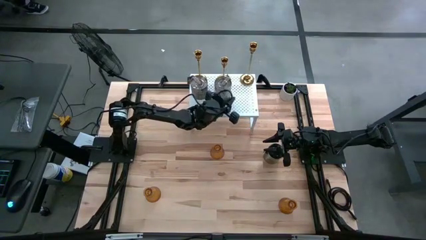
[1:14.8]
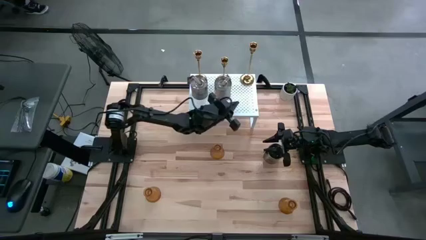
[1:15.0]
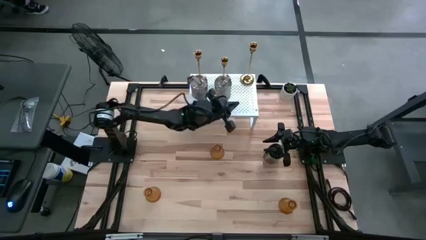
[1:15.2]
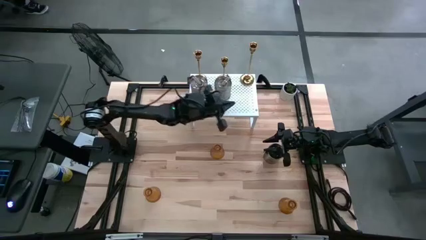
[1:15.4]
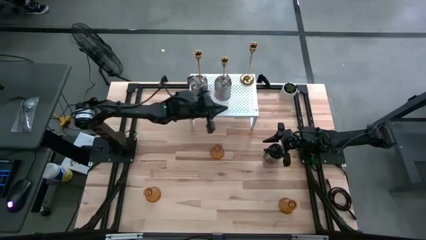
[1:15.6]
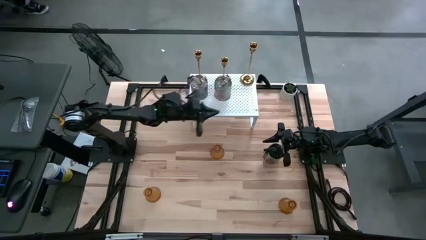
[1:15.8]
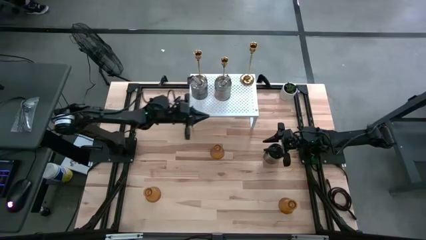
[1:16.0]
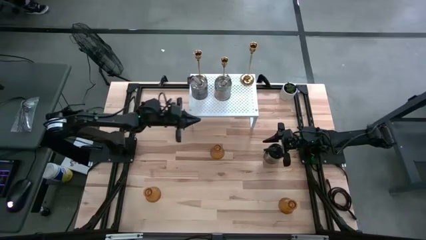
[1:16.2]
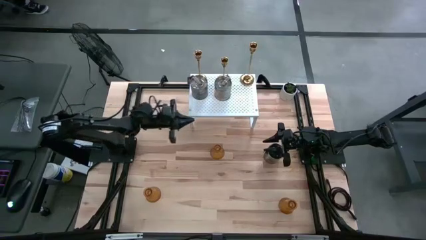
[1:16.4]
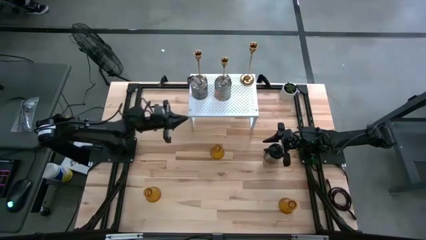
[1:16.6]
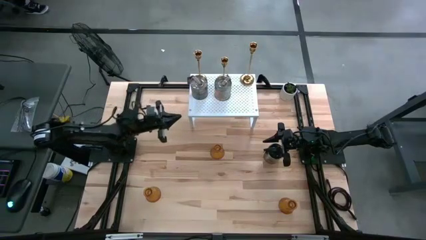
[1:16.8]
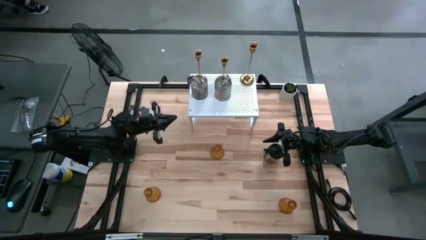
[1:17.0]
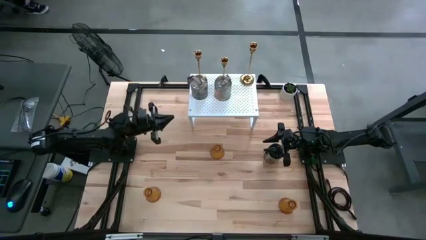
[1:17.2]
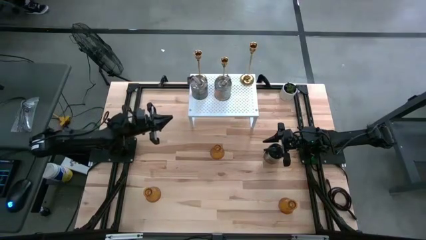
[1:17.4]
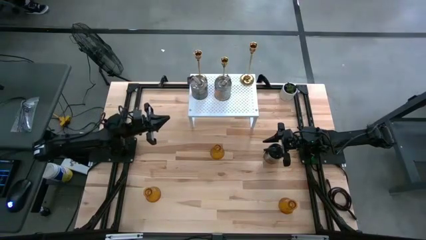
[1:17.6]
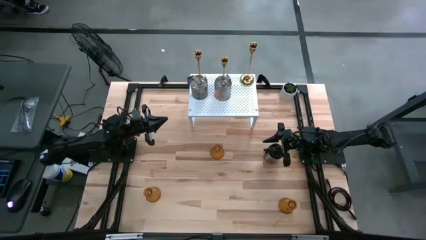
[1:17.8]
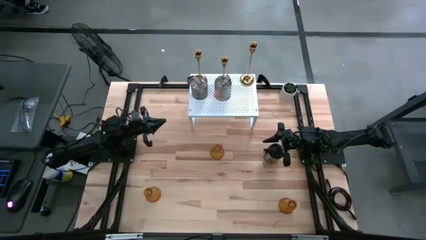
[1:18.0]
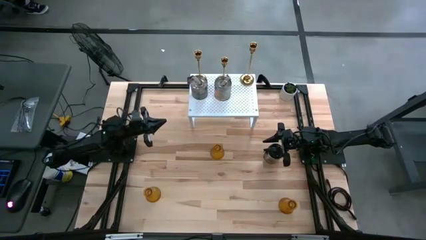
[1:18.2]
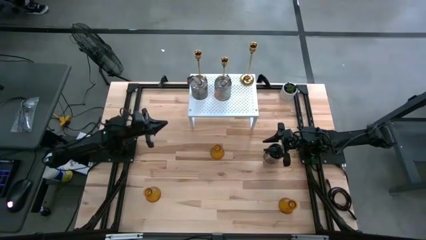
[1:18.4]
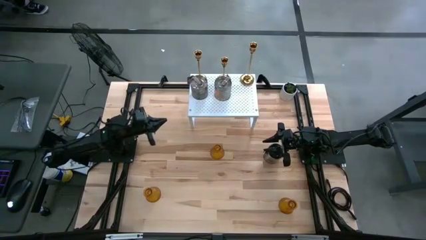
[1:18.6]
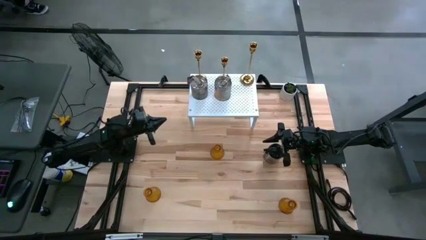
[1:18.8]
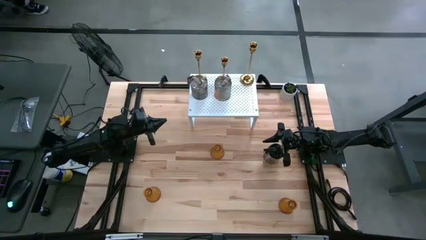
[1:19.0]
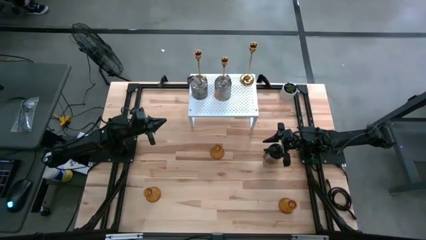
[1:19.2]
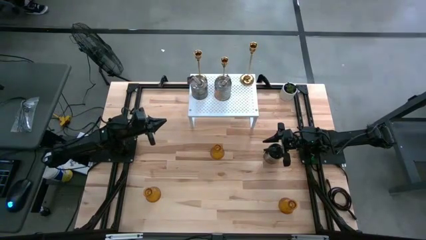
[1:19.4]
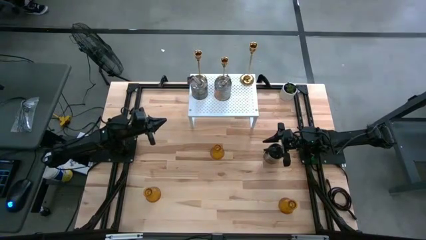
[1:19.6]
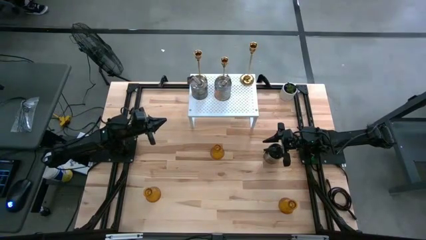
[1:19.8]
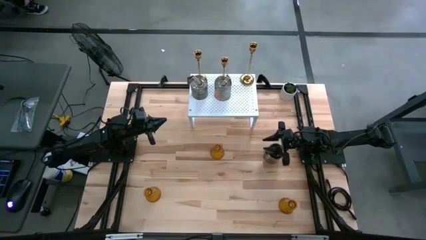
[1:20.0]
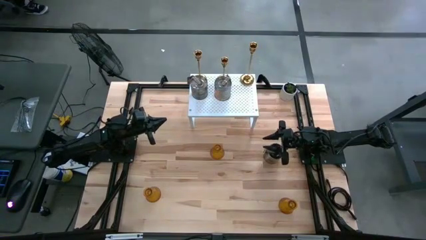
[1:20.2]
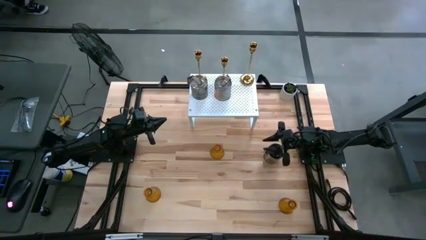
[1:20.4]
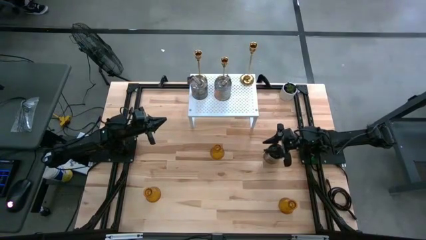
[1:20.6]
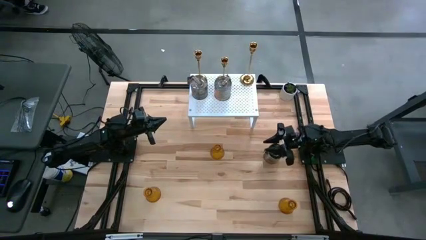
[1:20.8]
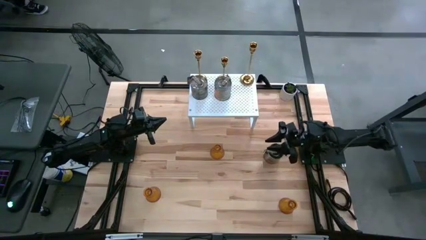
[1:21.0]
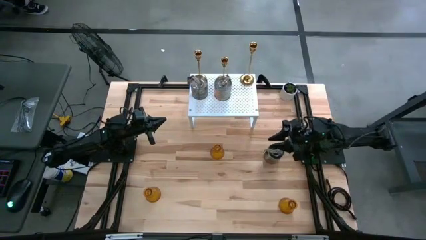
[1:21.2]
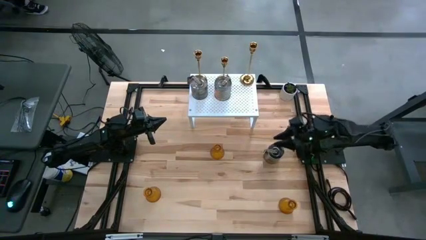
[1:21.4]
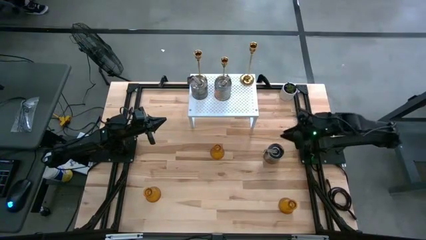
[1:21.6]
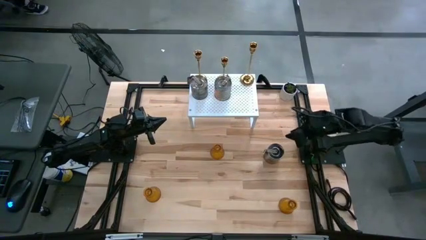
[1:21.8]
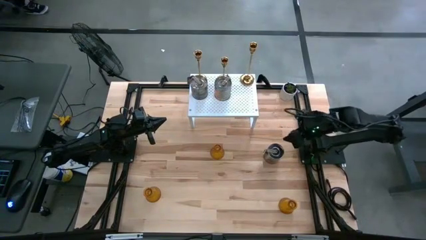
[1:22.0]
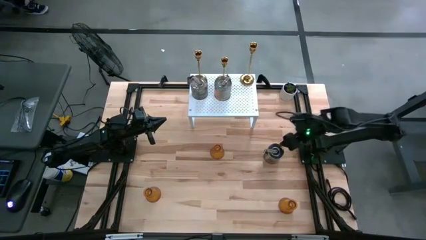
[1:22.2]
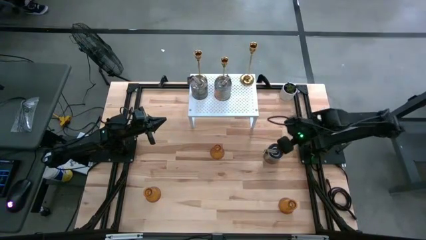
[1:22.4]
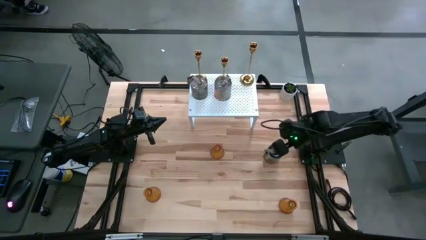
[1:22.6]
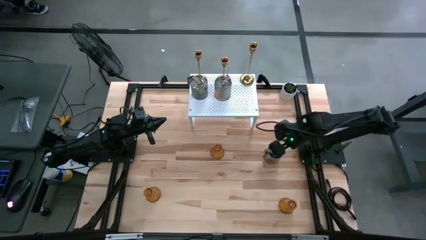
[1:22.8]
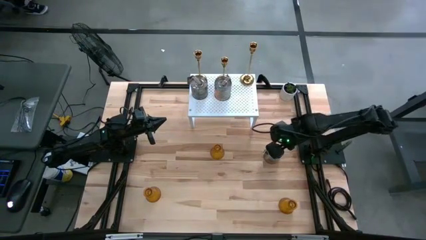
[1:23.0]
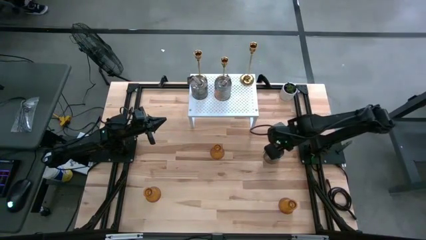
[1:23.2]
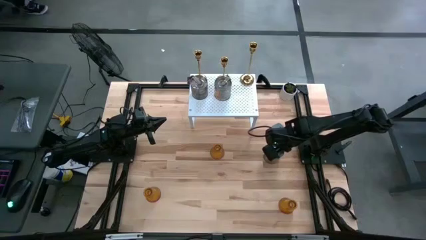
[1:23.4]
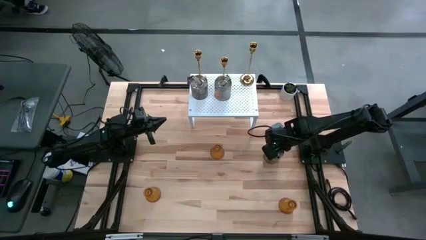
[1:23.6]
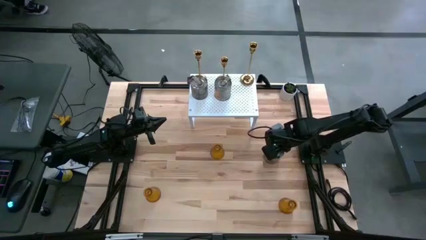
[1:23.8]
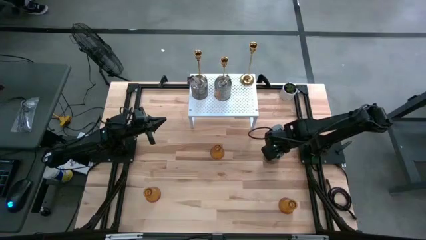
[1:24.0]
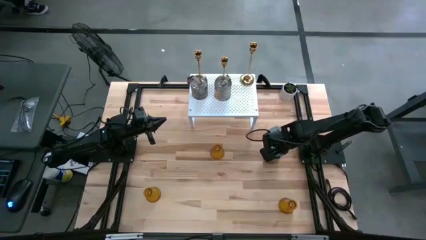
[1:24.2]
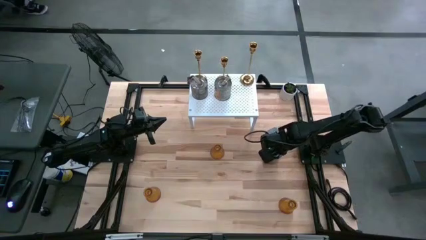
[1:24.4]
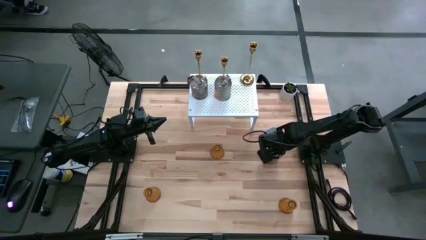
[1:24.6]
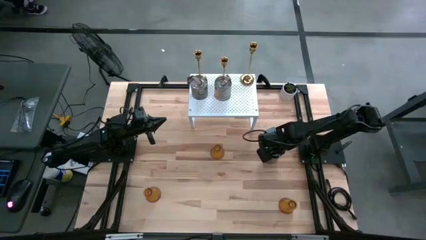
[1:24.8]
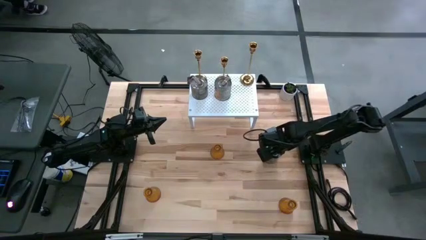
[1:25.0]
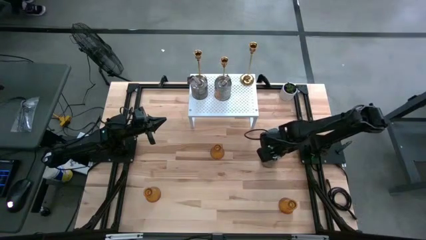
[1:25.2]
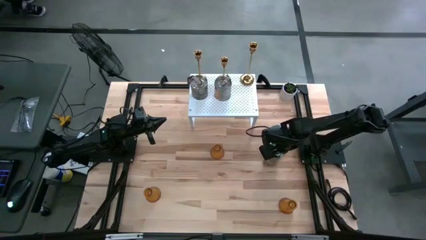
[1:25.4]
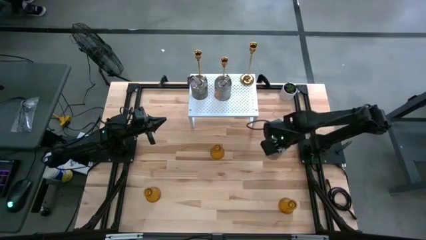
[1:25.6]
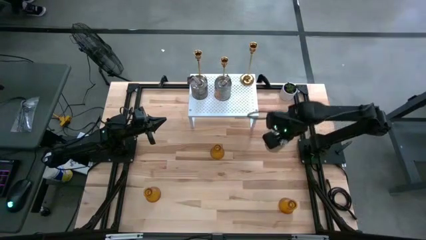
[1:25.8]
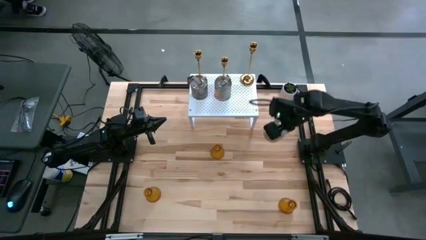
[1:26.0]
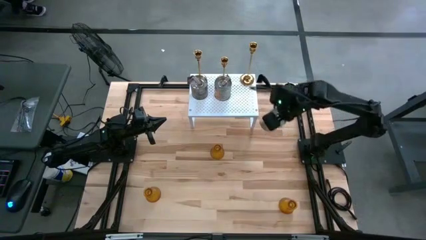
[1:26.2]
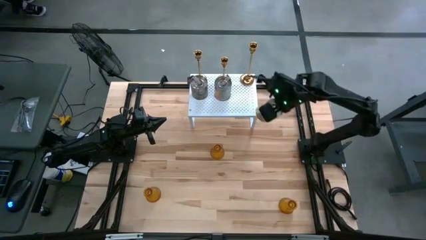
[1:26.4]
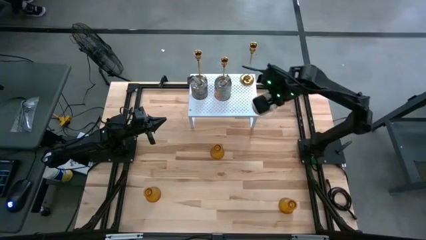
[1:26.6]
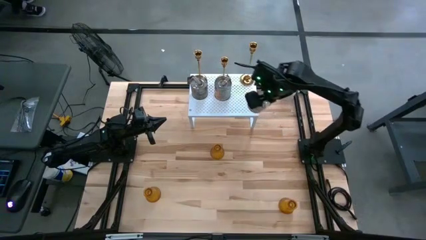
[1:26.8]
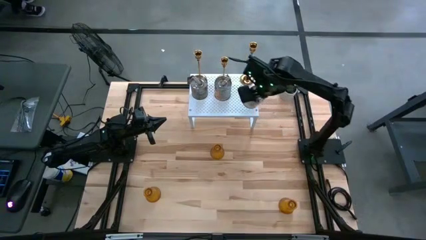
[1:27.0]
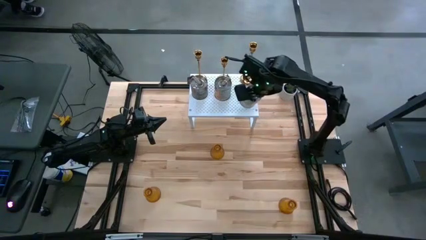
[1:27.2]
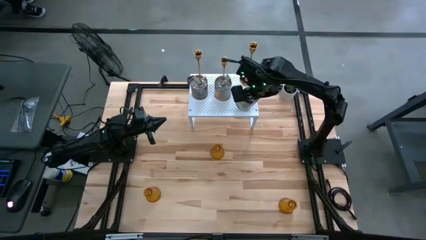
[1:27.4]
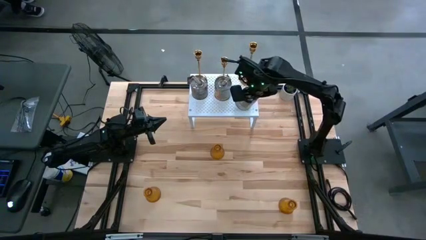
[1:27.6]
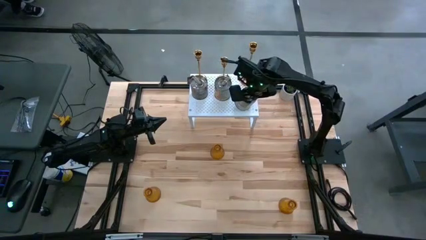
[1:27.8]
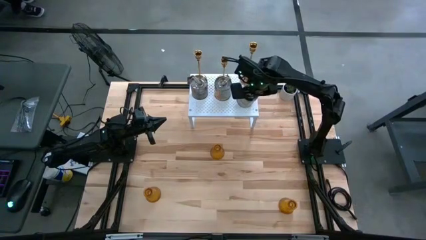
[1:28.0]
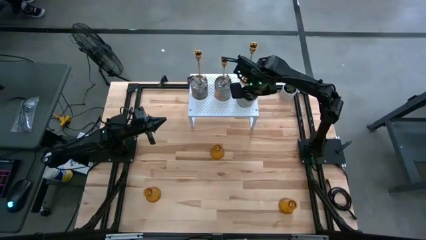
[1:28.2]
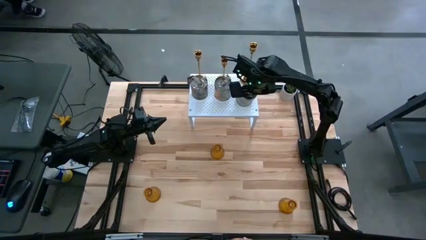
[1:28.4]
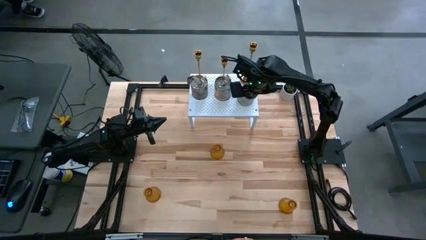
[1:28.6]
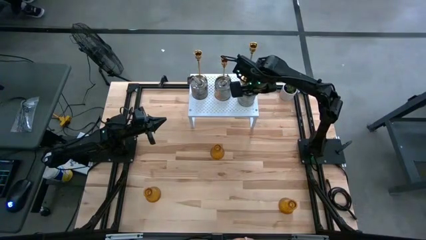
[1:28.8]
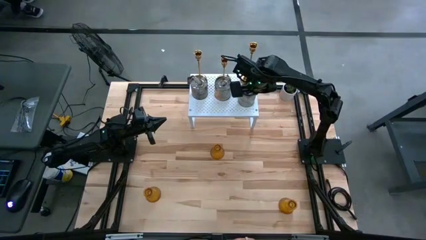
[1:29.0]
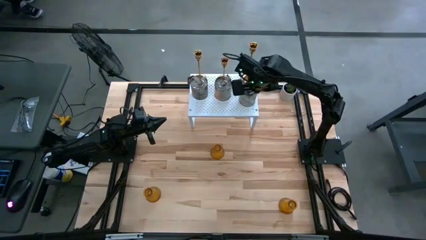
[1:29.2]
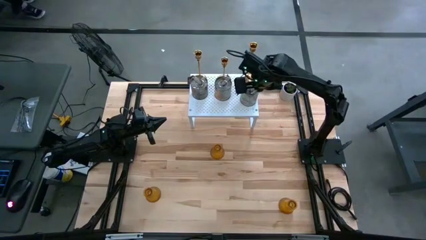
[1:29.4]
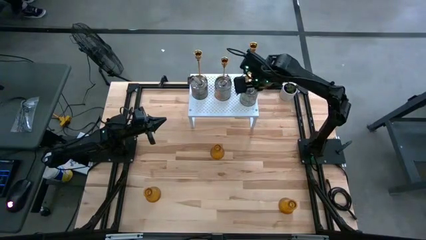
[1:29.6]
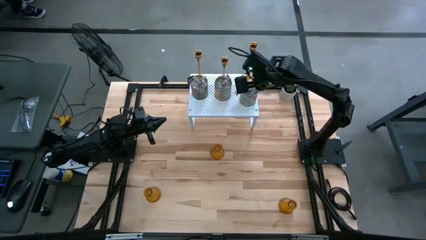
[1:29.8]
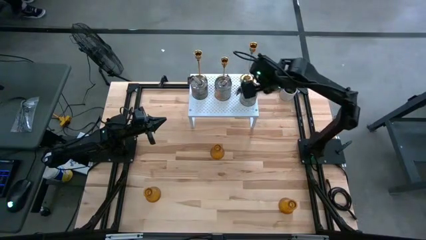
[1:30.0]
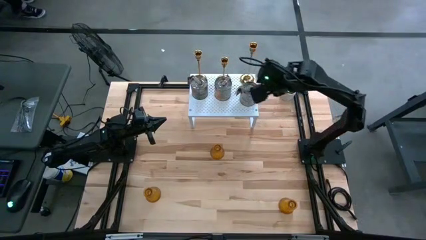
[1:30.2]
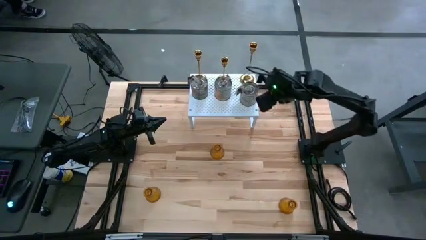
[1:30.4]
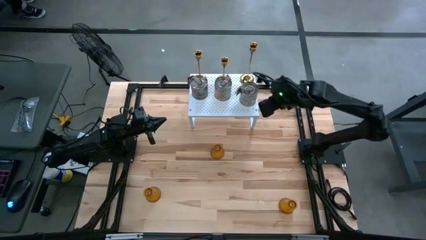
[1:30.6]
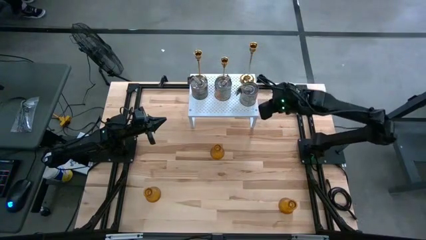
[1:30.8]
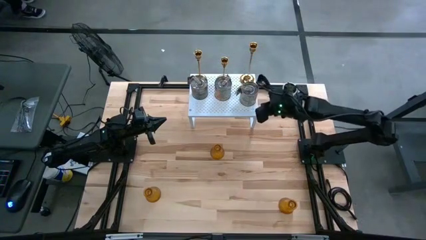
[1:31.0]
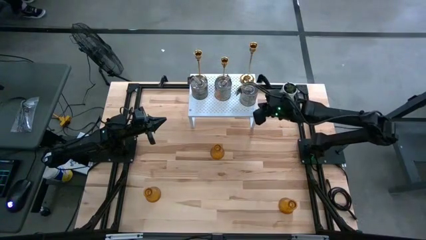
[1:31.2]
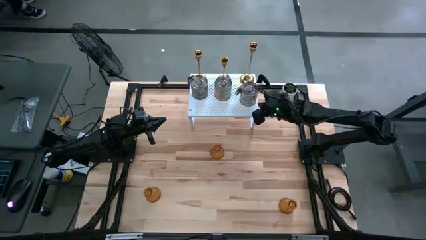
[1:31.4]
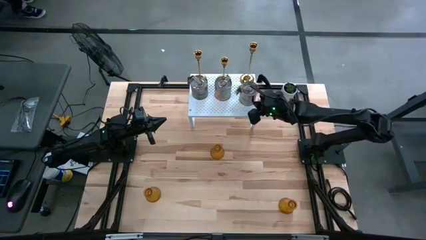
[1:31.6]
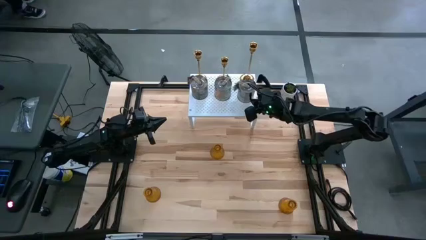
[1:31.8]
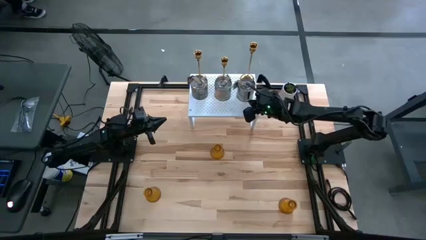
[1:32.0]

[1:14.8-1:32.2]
Task: Pick & Place candle stick holders
Put the scented candle on the shelf
